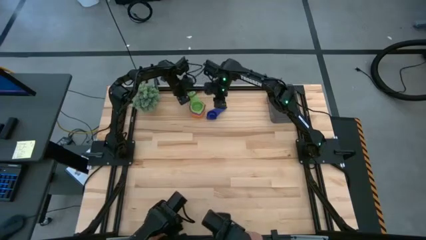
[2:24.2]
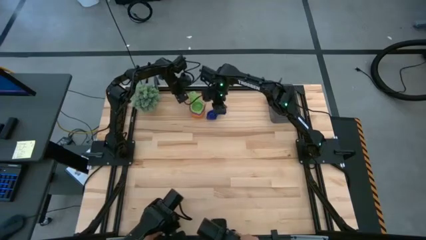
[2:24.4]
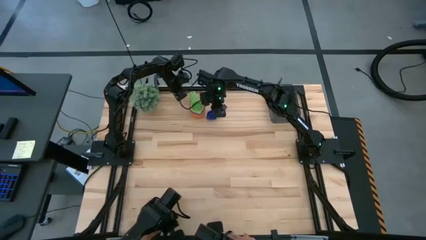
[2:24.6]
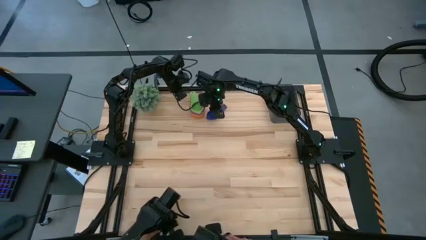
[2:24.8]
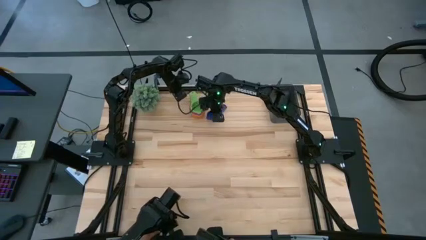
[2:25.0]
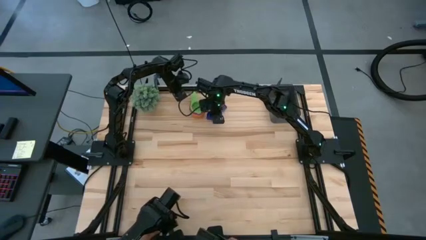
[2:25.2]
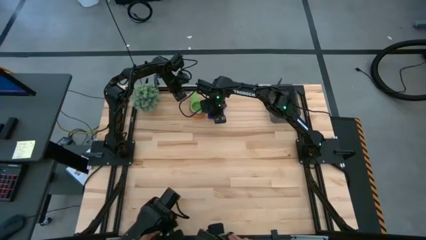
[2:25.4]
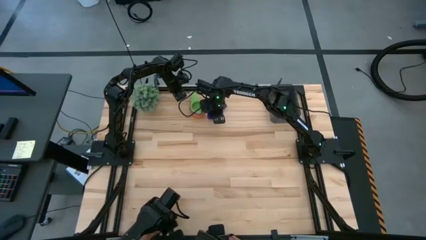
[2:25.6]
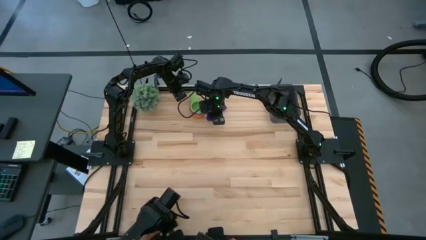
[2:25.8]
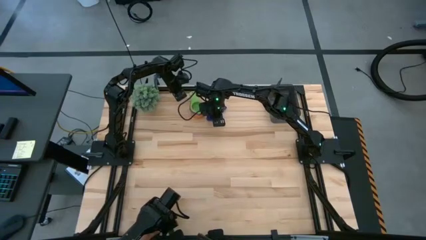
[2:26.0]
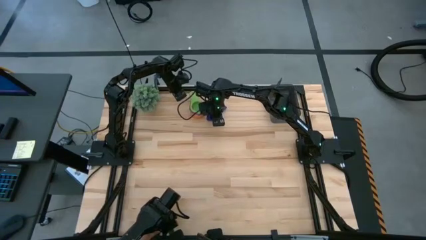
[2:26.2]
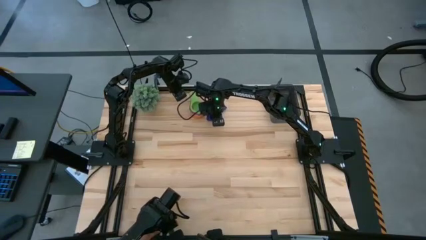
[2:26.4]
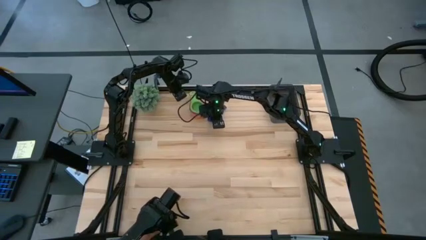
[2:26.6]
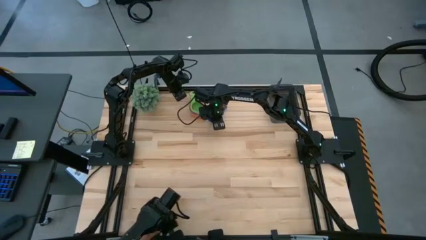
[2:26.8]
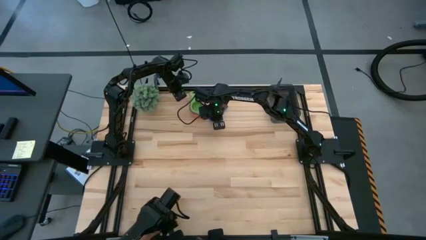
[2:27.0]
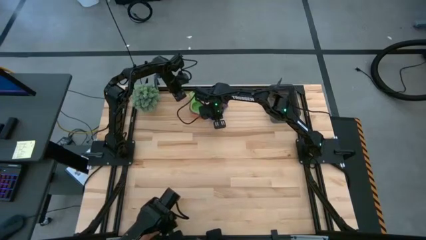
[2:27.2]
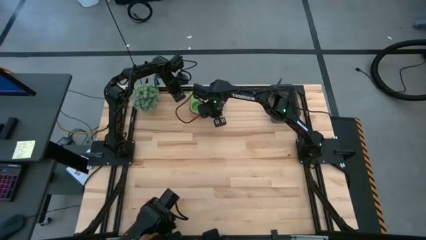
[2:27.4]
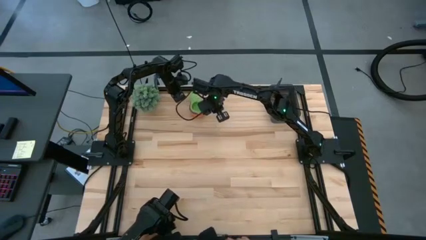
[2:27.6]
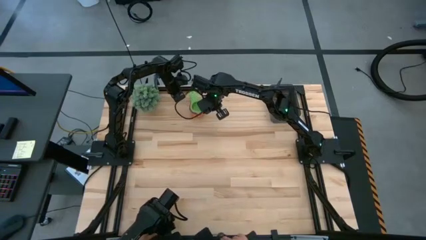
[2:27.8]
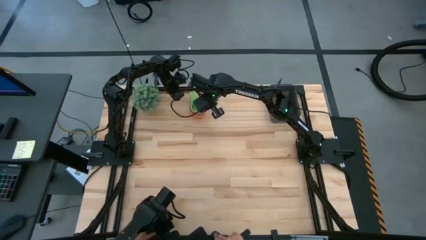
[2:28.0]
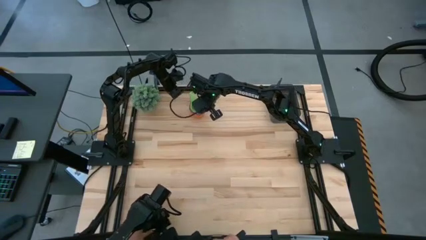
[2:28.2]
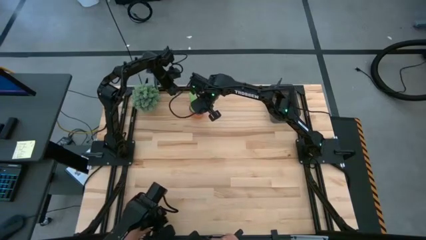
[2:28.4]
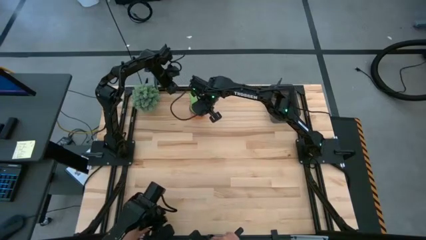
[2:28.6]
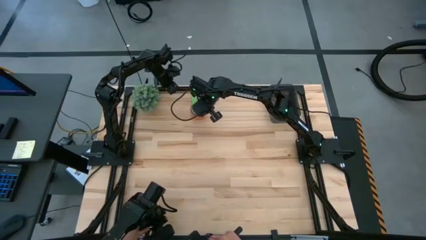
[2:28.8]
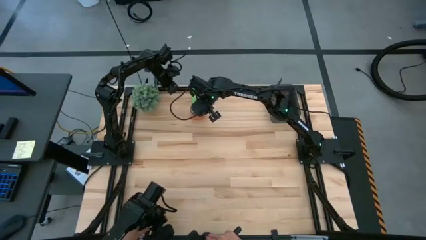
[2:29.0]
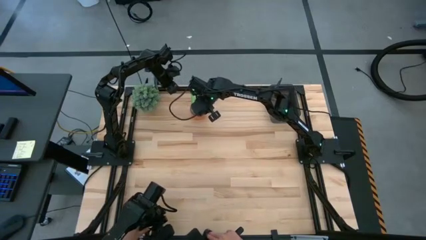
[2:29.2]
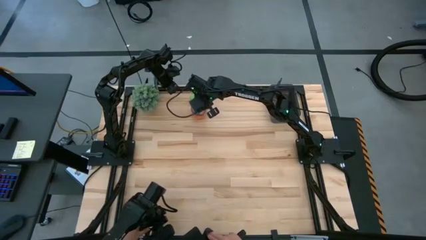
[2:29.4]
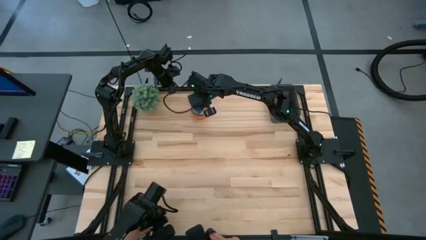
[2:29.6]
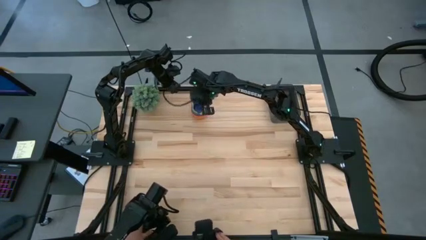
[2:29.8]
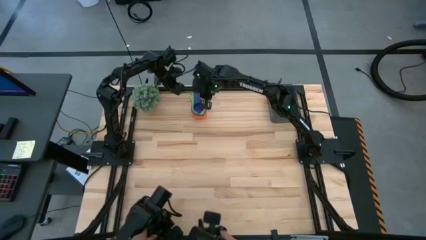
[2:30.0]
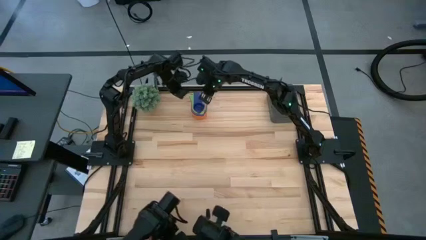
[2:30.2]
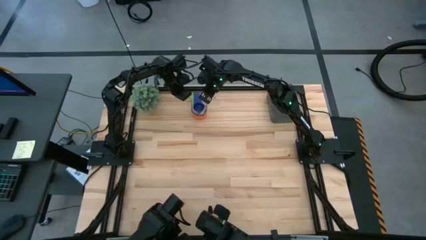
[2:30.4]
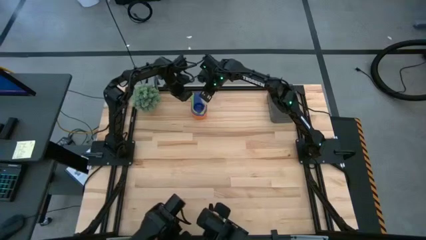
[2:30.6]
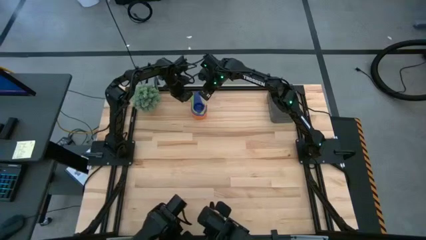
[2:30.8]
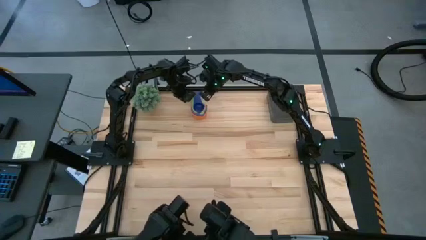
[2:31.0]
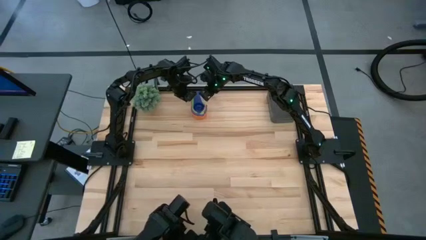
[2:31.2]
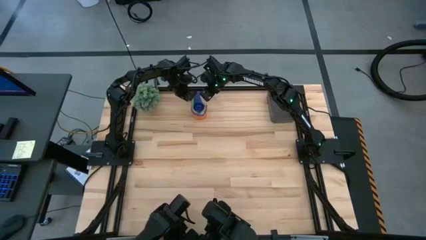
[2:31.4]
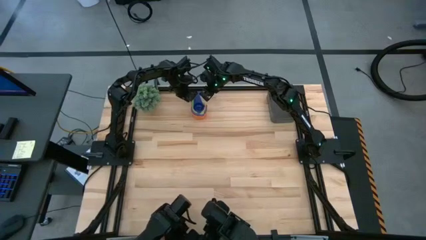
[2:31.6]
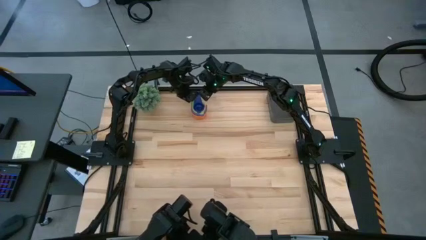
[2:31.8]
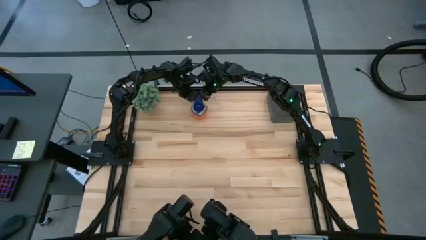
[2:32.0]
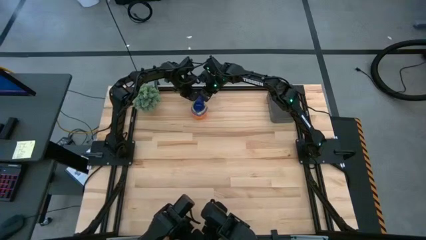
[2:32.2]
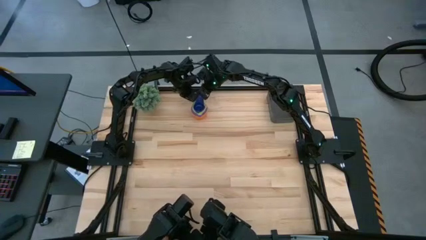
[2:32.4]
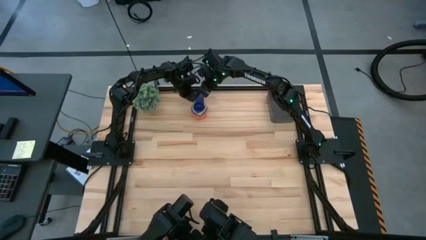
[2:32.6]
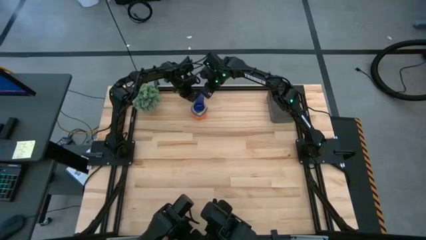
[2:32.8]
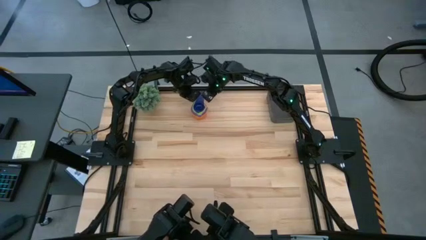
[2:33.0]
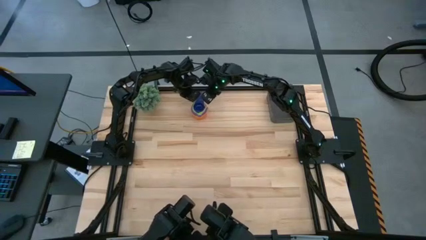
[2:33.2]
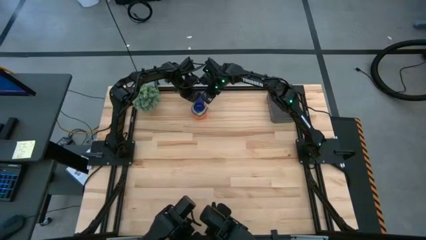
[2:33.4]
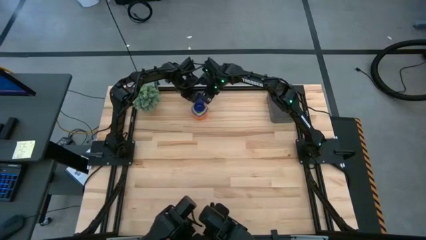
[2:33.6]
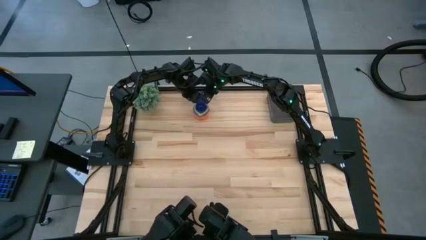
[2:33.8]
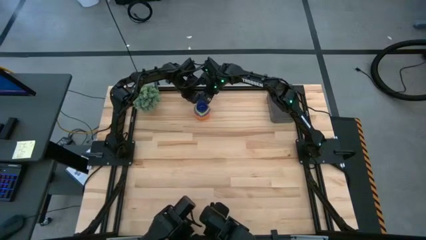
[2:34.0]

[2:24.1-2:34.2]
Task: Nest measuring cups in basket
Stack the dark blue measuring cup on top of the green measuring cup

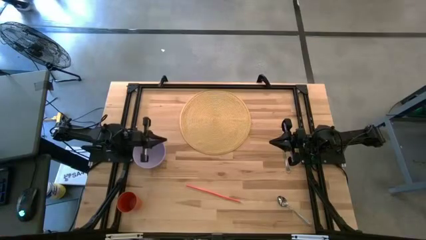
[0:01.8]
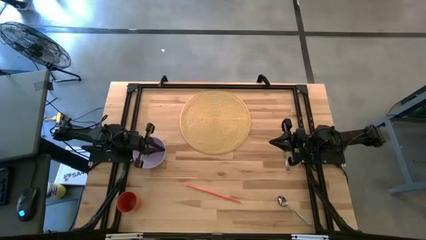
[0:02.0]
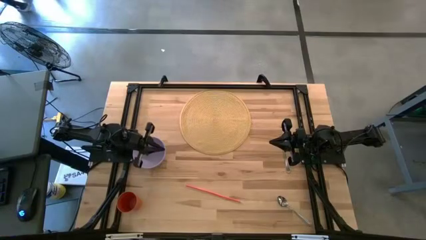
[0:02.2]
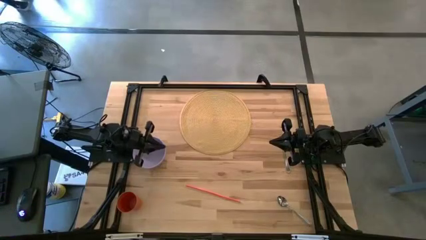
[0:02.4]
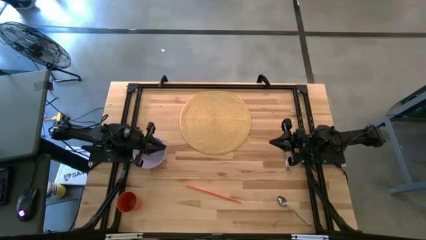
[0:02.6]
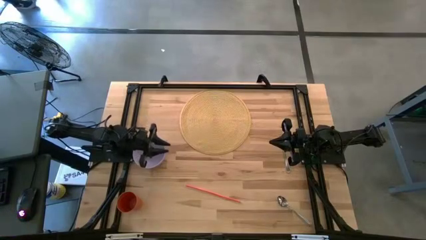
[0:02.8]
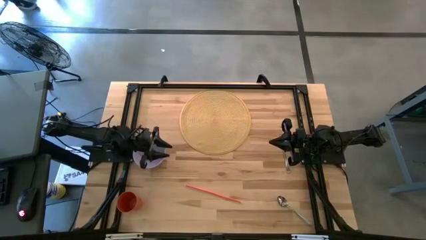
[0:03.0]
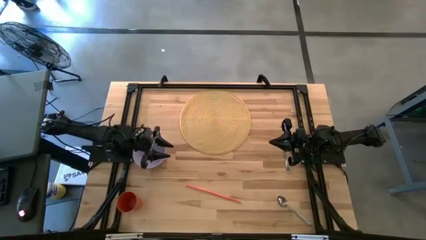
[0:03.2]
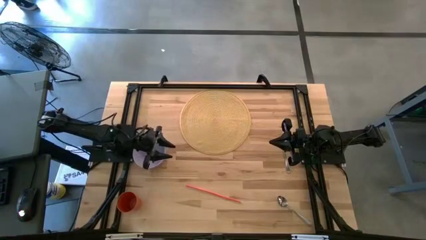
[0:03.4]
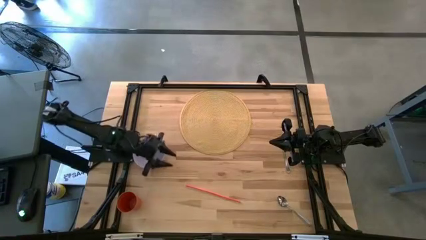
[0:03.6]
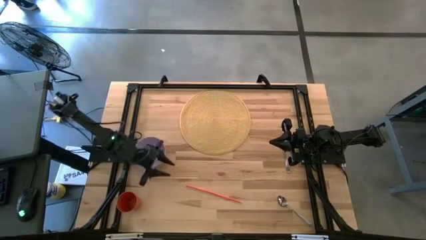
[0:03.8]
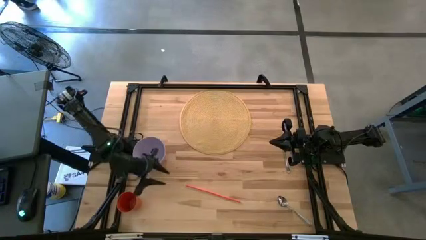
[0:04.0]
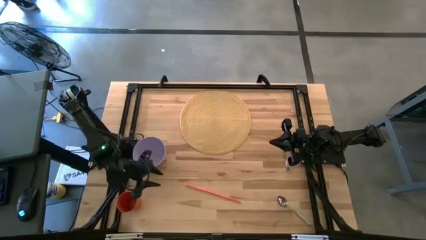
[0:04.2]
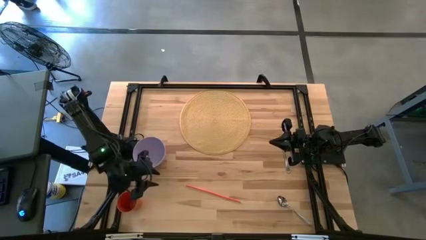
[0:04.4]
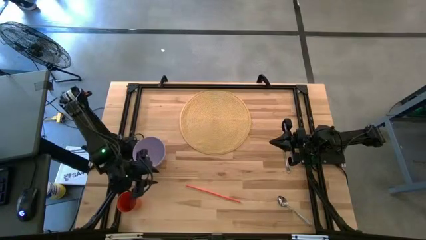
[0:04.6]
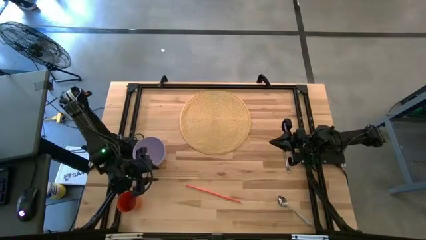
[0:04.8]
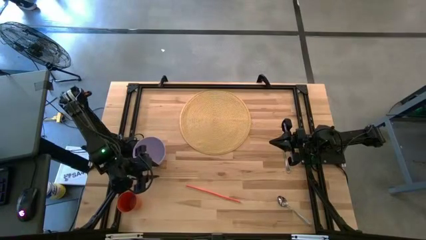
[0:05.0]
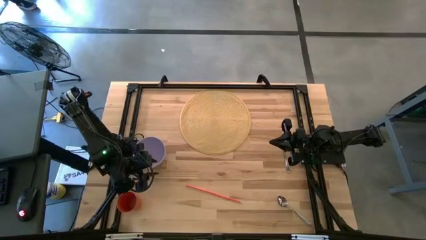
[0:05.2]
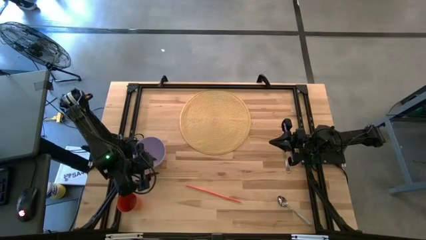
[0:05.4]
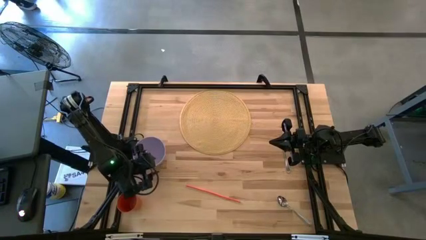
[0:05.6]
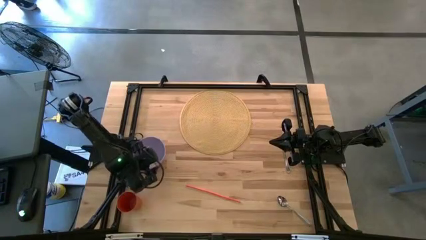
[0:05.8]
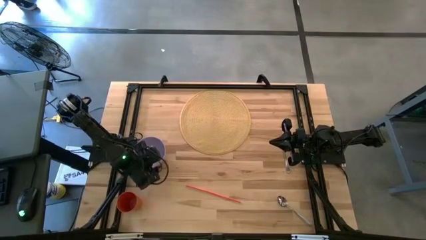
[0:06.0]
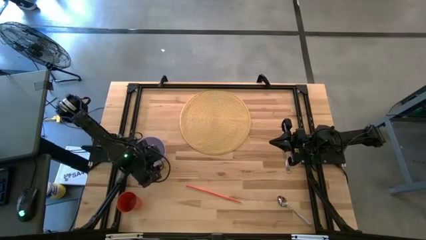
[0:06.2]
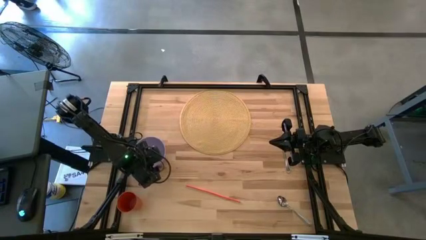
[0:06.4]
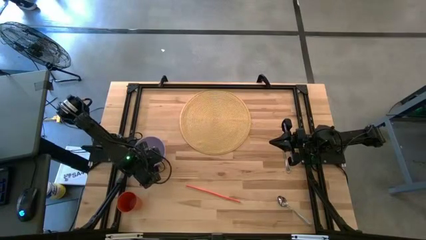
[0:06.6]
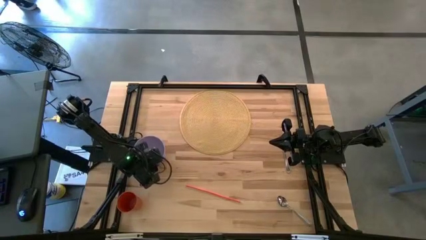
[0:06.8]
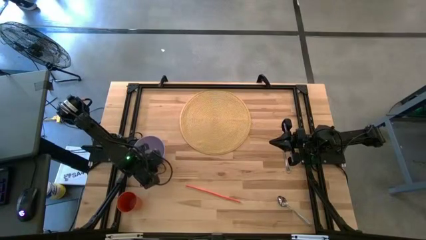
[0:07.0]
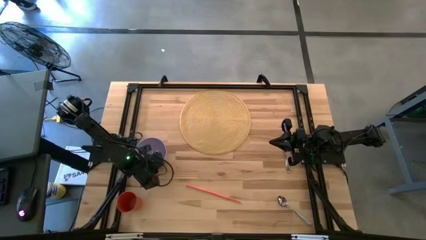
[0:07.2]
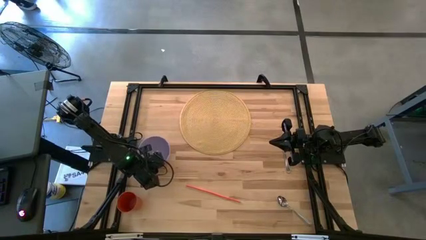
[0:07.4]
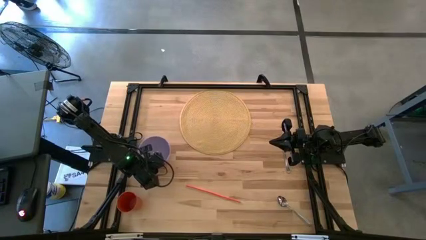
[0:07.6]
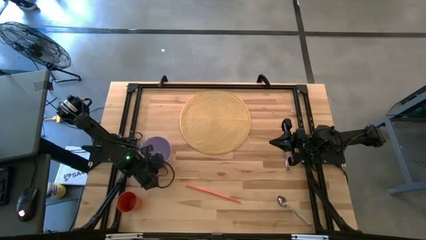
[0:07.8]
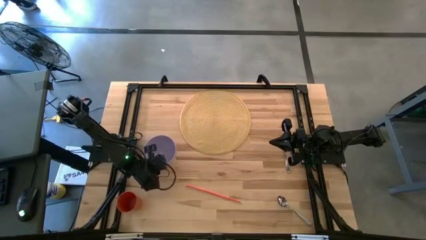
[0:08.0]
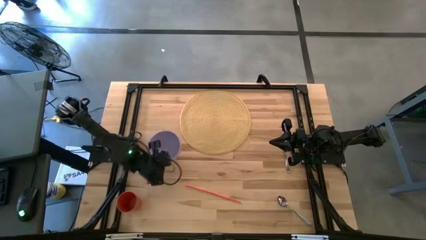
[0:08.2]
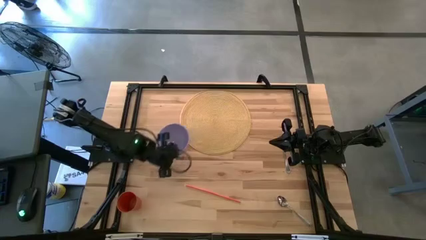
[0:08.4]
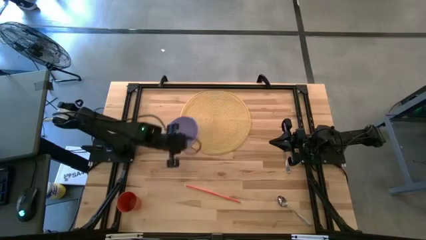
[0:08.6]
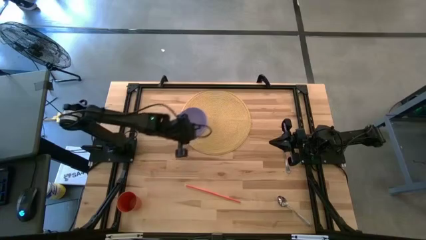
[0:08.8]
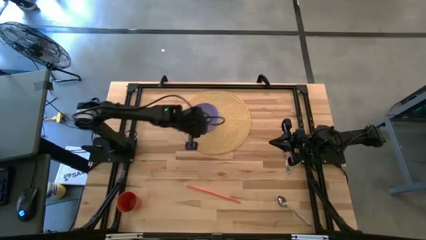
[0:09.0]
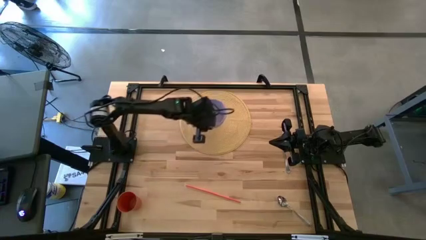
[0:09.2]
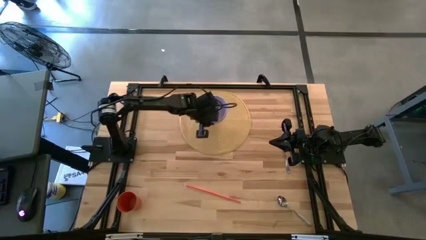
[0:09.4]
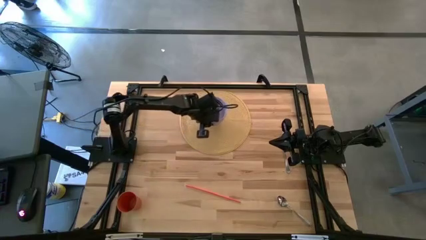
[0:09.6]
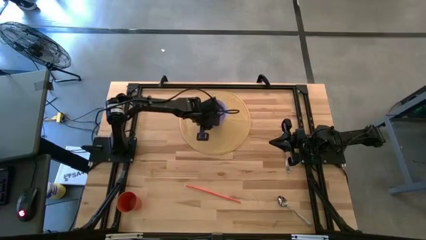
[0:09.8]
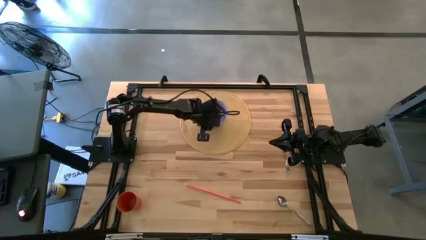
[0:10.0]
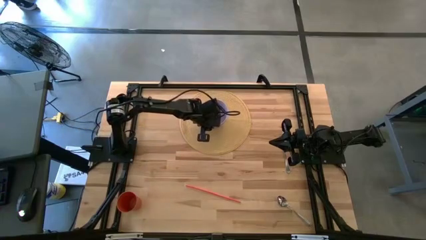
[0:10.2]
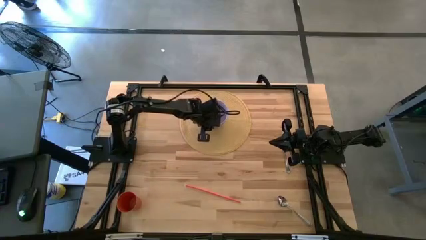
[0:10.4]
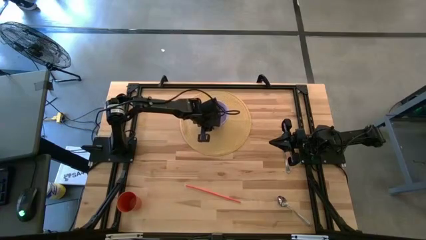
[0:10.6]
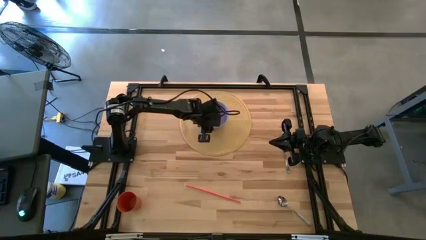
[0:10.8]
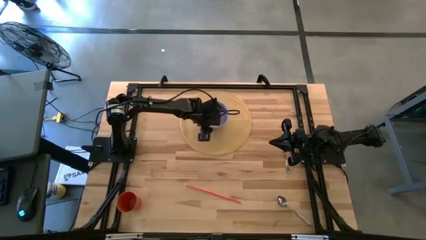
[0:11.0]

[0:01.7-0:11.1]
Task: Pick & Place Utensil
Put the violet bowl on the table placemat
